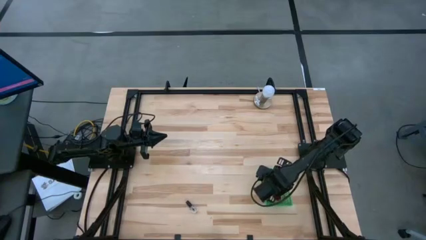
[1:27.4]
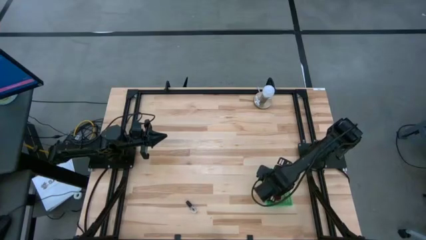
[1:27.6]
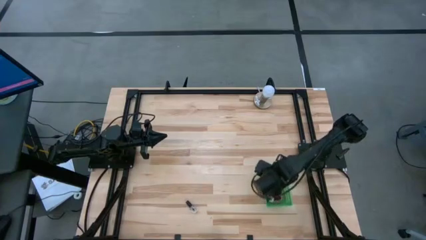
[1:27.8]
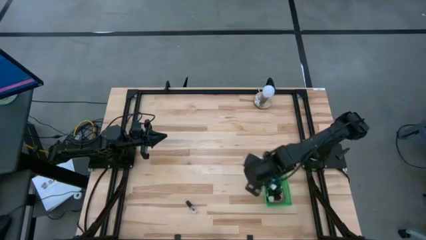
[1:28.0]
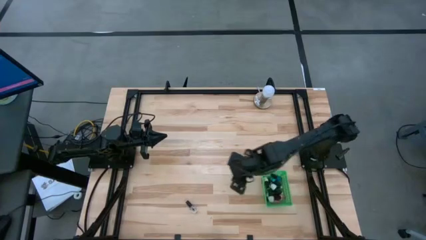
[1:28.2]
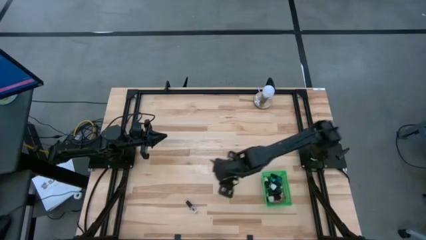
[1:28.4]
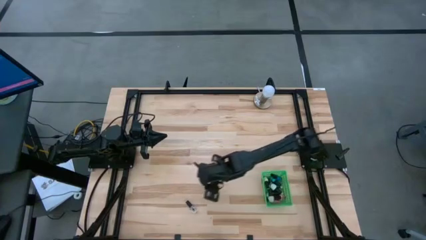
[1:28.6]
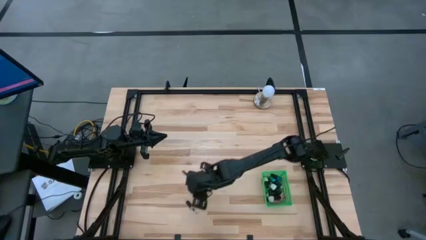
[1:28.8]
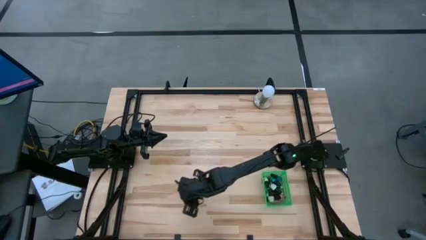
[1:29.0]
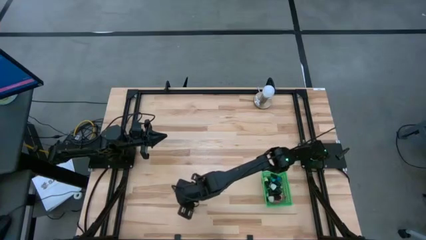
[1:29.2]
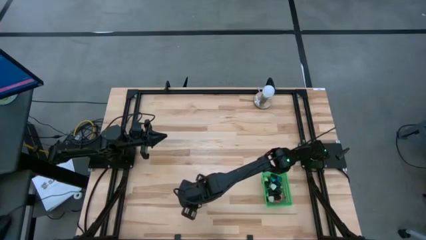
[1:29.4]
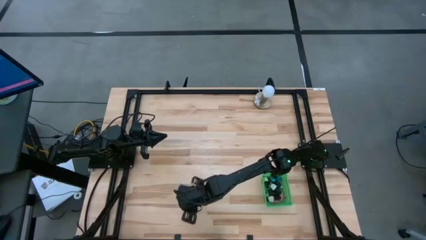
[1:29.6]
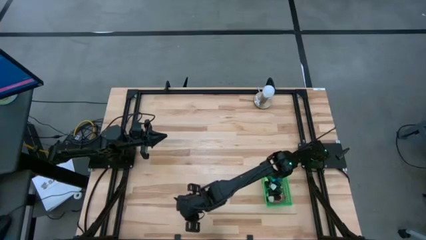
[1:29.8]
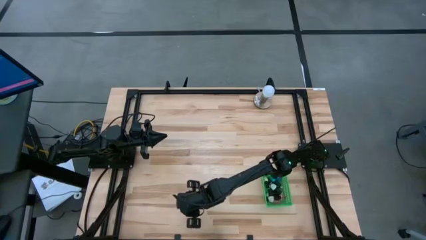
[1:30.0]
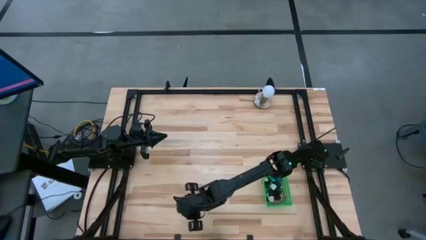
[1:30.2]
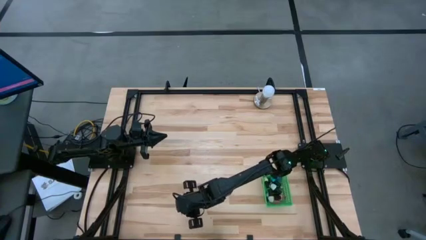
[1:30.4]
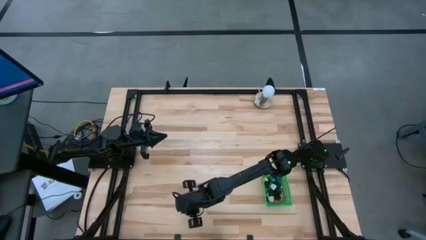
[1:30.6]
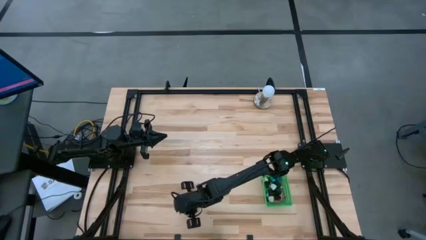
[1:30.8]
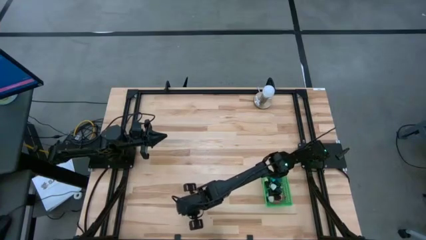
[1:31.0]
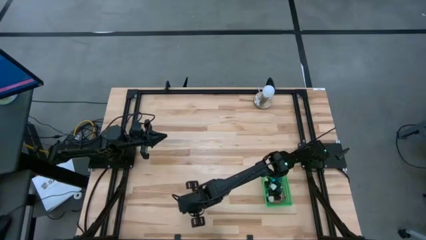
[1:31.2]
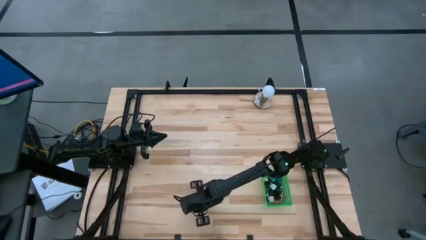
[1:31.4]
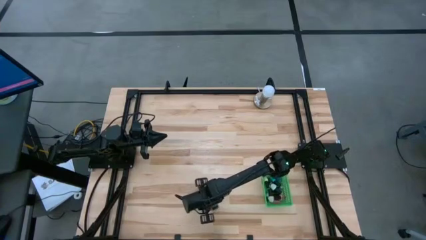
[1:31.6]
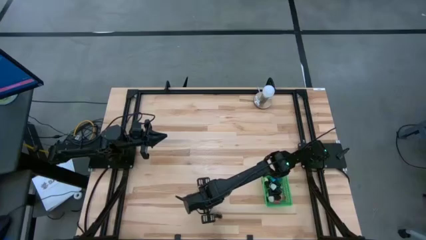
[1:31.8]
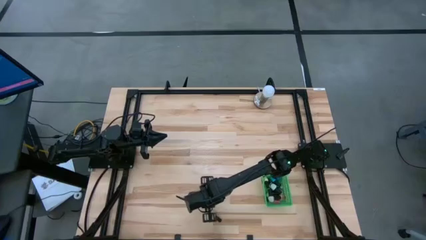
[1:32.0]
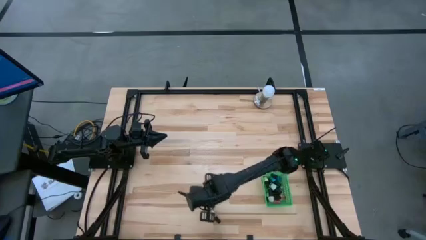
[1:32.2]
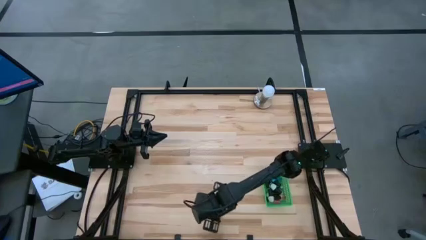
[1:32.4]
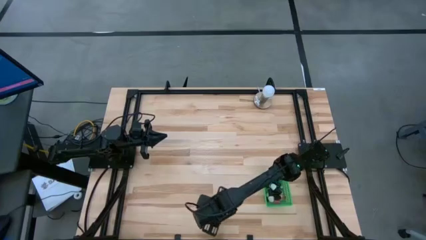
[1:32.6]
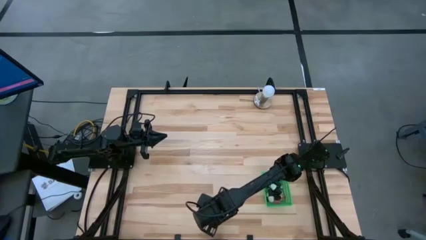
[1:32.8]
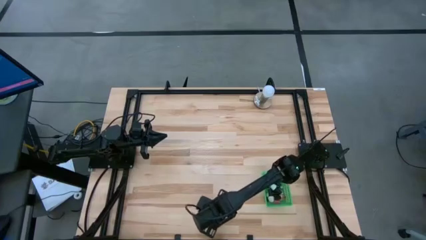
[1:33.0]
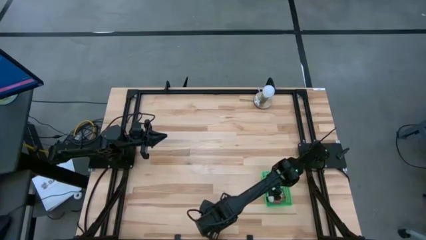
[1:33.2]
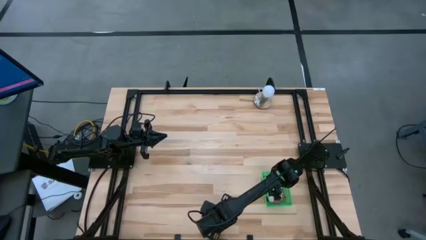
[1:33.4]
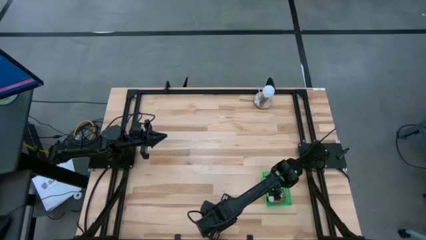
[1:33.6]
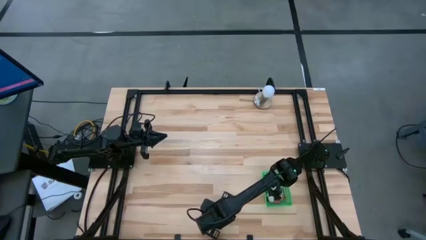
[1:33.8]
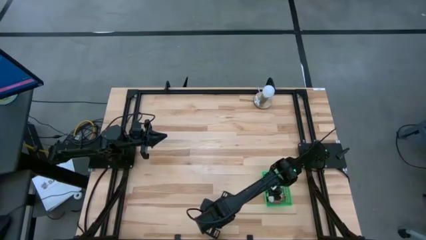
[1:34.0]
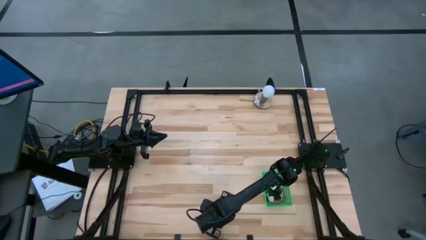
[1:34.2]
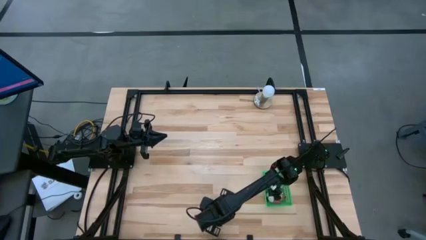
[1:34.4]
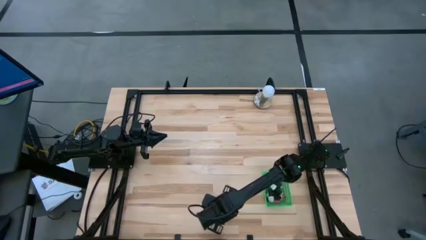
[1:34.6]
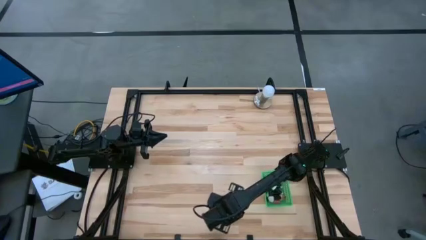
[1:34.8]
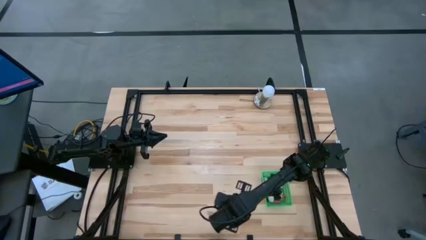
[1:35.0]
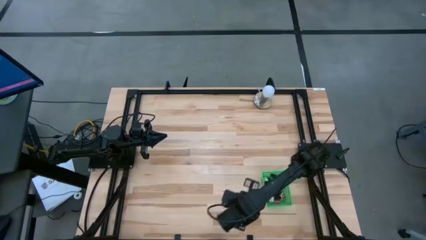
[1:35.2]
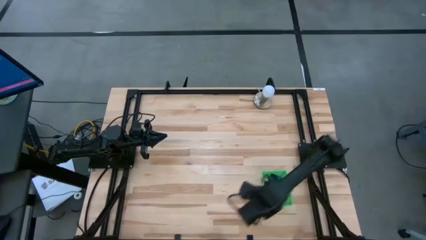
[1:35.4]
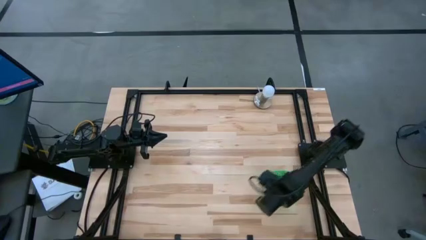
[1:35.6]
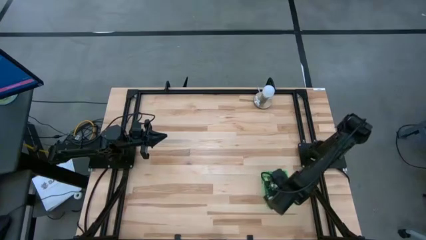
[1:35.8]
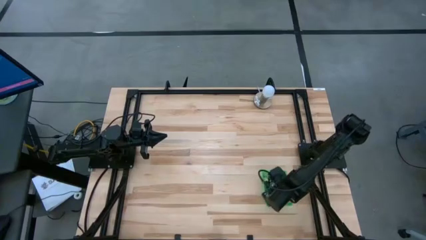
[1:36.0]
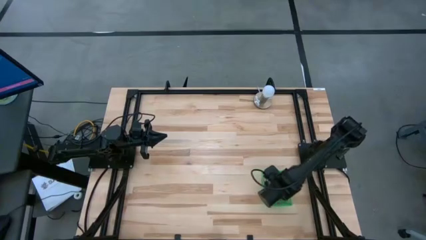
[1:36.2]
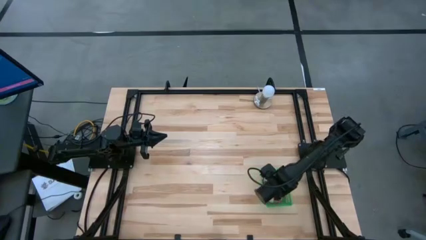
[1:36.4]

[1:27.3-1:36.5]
Task: Pick & Place Nail Polish
Put the transparent nail polish into the green bin

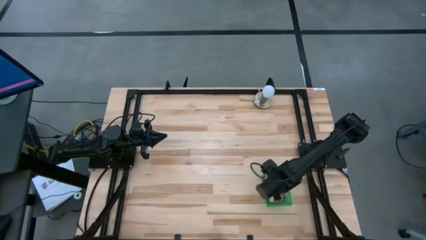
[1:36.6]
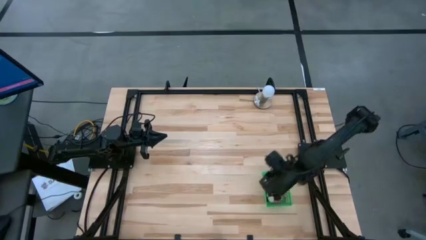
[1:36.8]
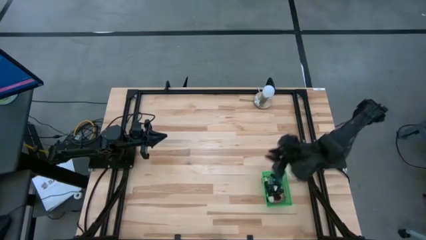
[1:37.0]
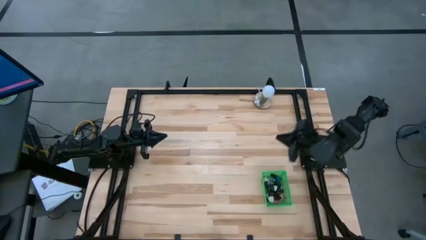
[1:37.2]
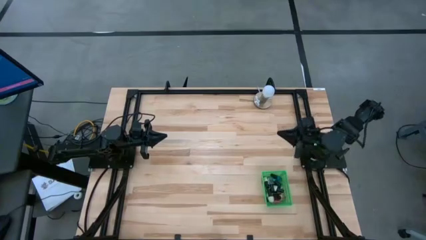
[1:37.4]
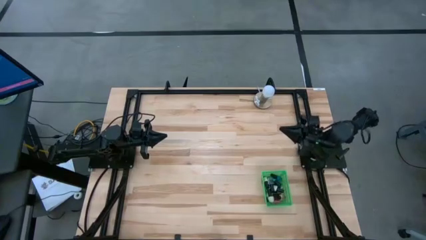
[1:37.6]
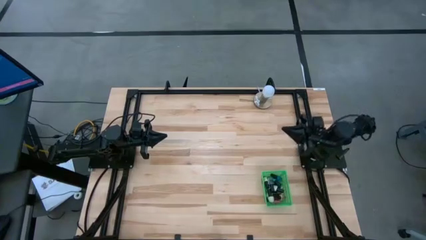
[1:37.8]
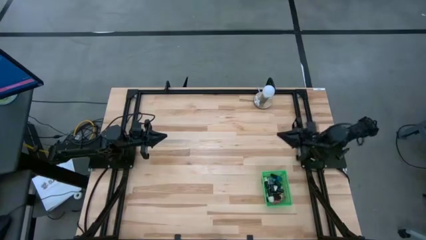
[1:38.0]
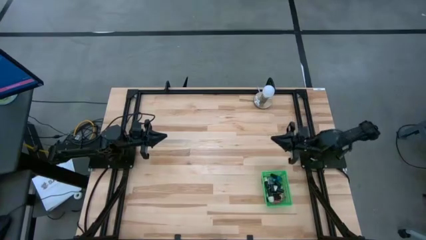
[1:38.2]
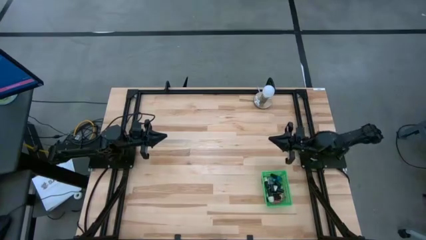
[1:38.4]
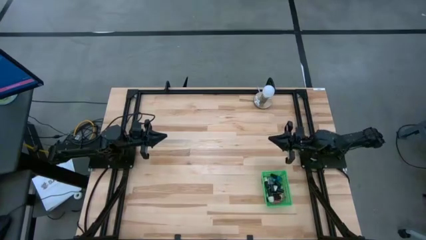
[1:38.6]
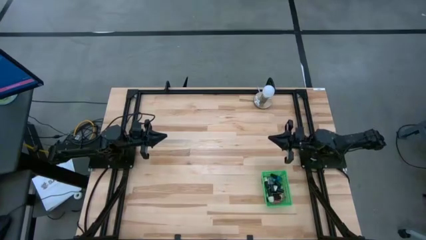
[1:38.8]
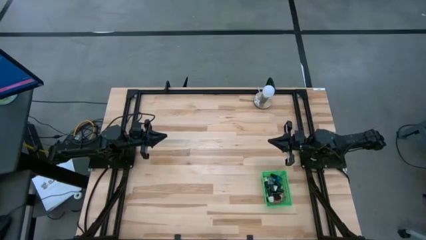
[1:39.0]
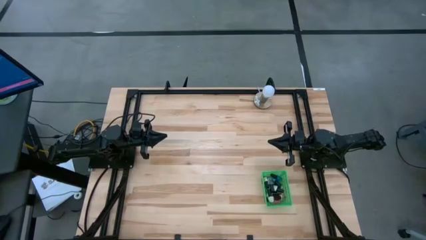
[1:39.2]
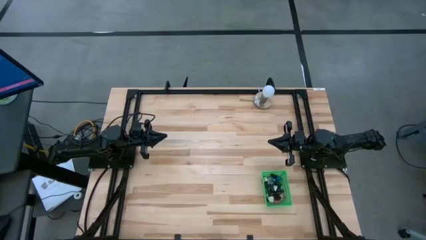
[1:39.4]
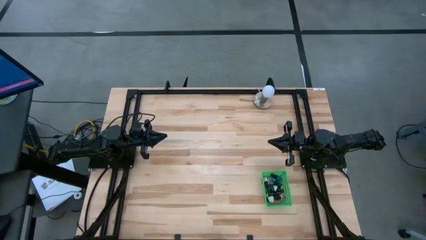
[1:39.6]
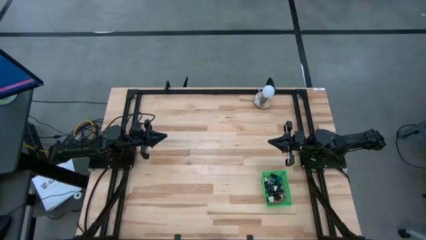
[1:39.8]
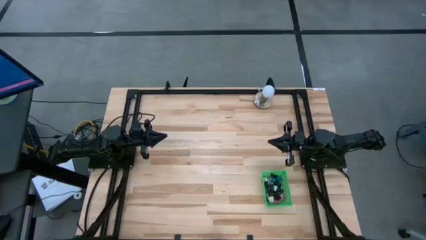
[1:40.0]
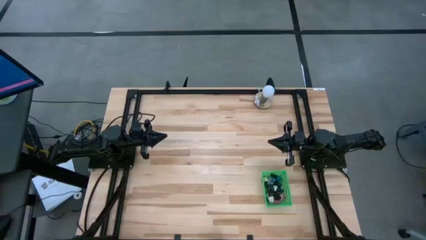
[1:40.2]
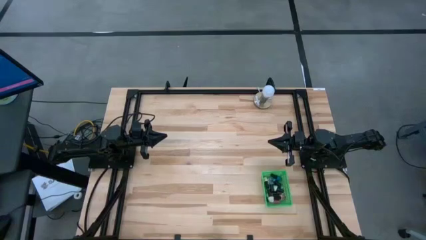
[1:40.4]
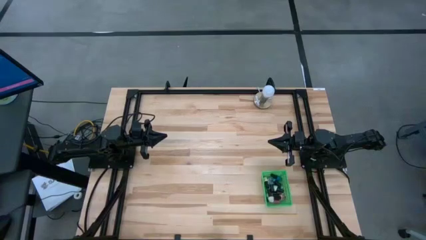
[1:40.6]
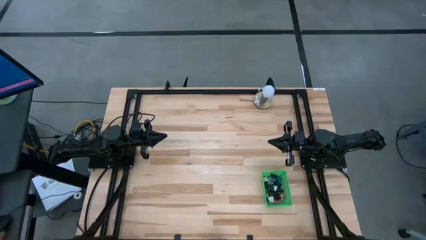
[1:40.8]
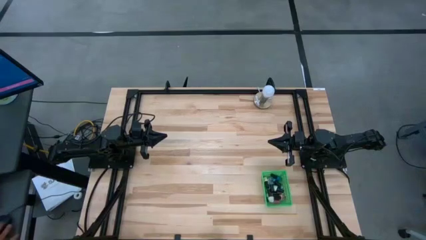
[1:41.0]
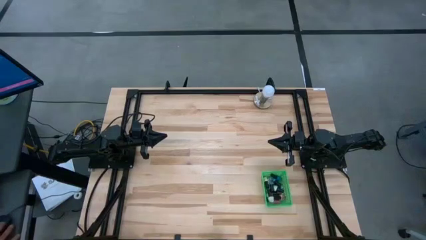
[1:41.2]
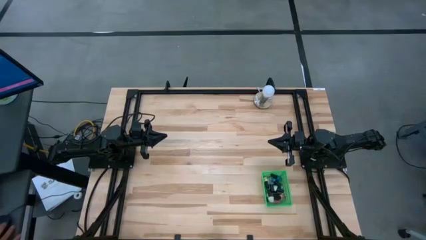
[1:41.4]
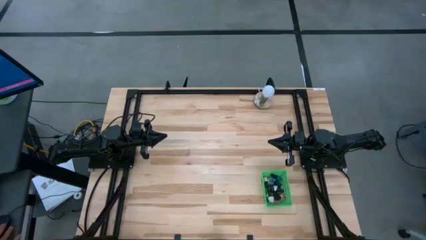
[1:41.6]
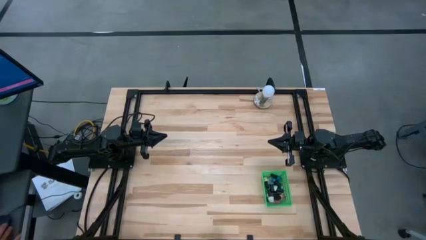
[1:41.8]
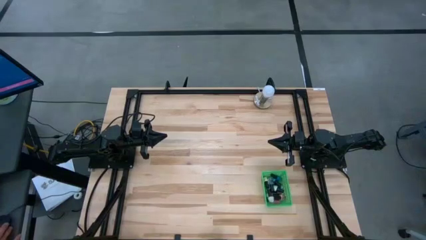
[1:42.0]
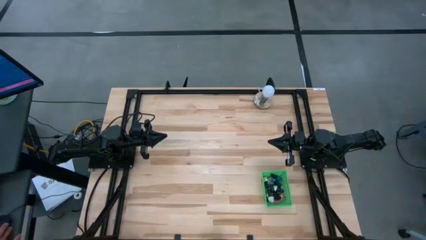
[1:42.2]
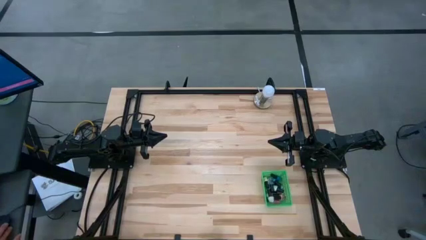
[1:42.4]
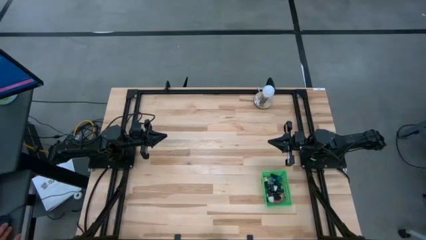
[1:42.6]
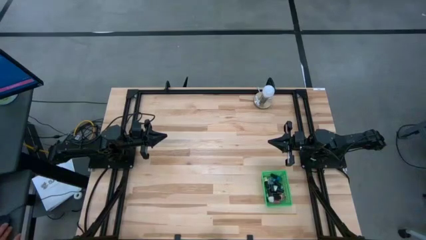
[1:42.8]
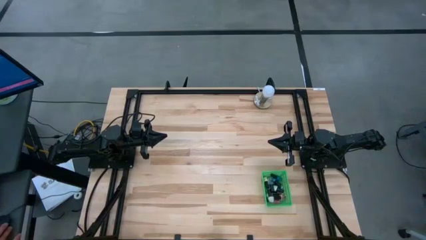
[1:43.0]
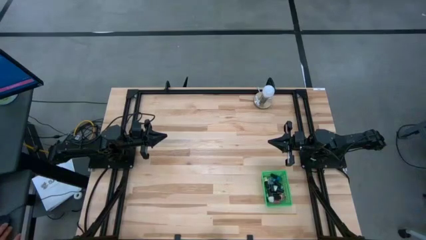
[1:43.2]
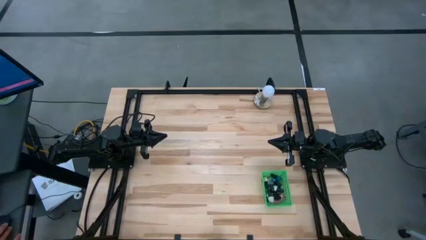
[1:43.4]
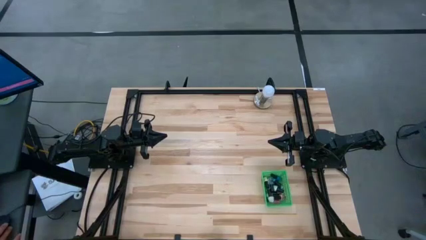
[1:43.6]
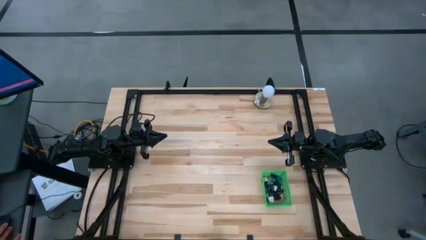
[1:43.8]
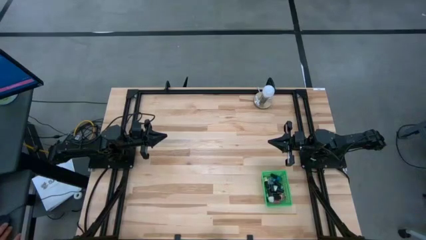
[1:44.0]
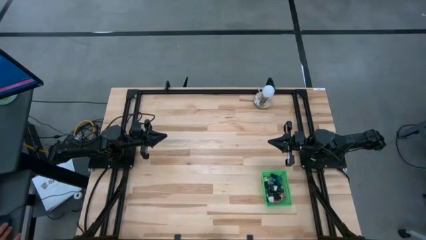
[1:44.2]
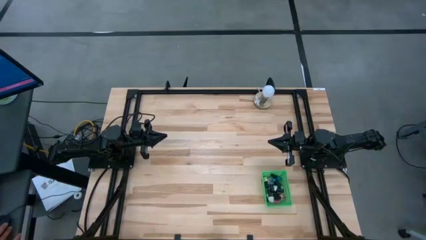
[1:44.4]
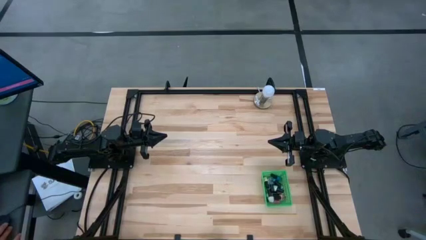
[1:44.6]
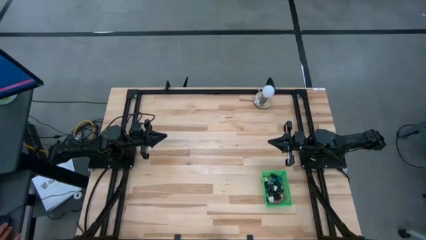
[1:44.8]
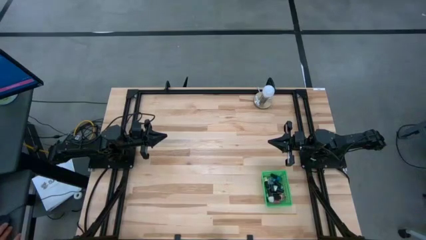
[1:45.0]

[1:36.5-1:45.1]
Return to Home Position
